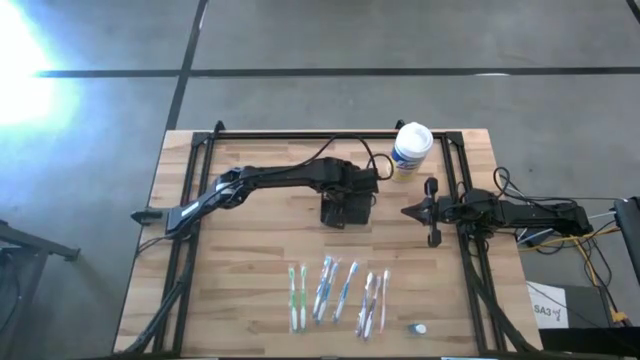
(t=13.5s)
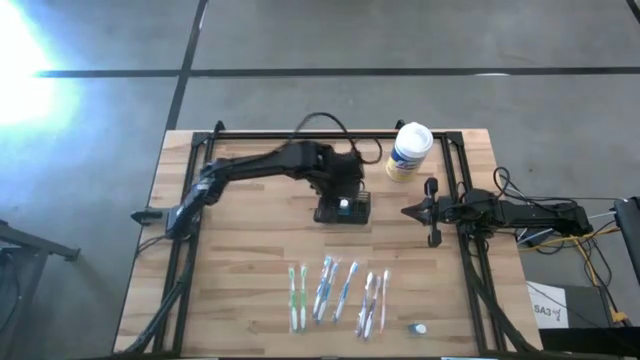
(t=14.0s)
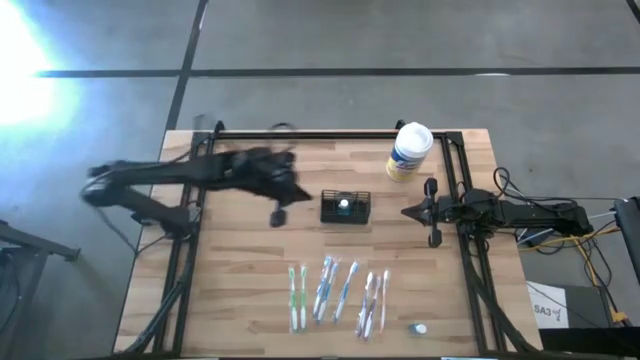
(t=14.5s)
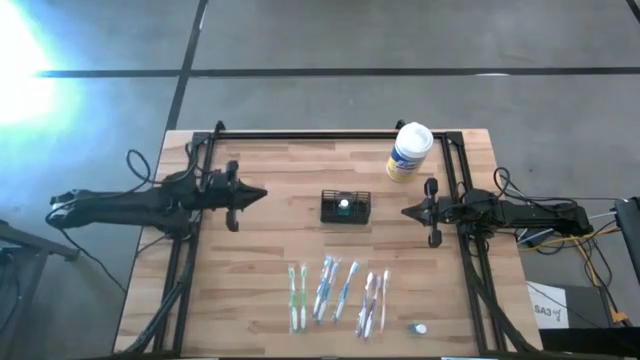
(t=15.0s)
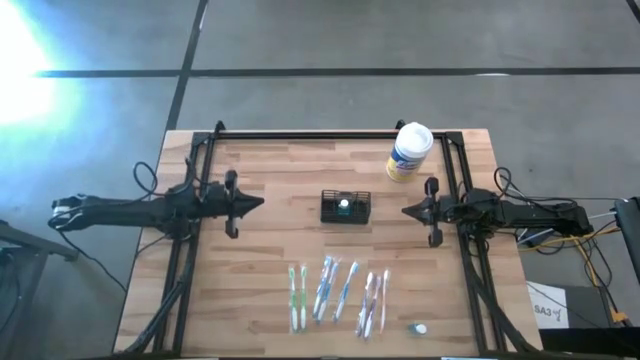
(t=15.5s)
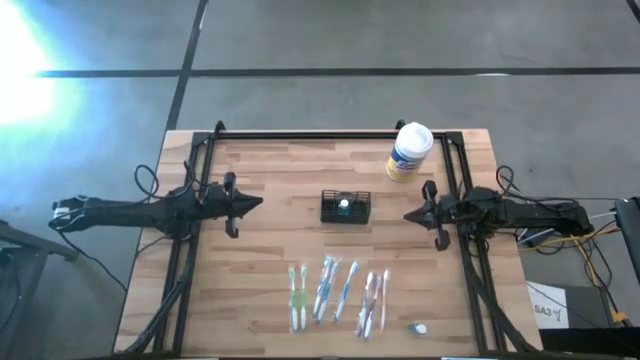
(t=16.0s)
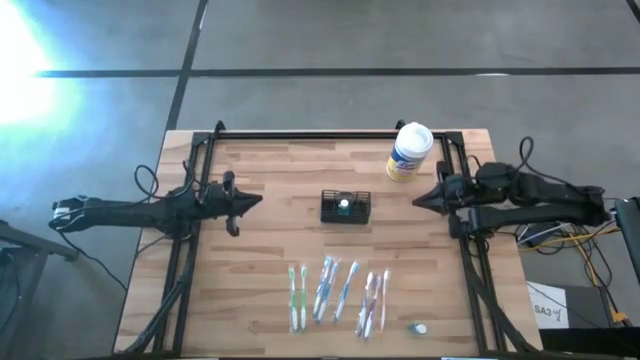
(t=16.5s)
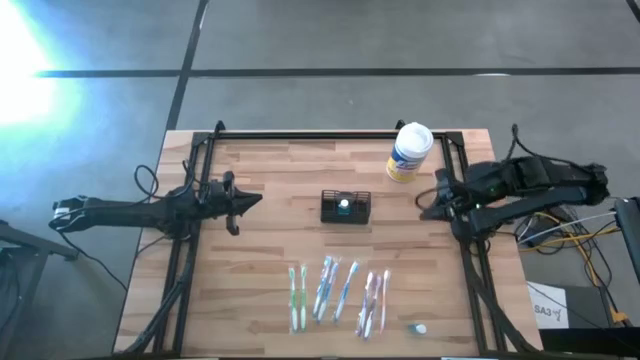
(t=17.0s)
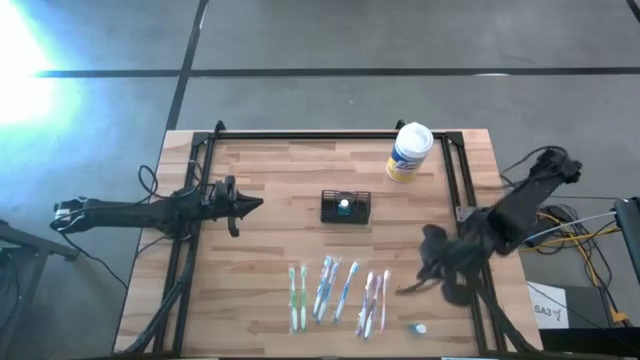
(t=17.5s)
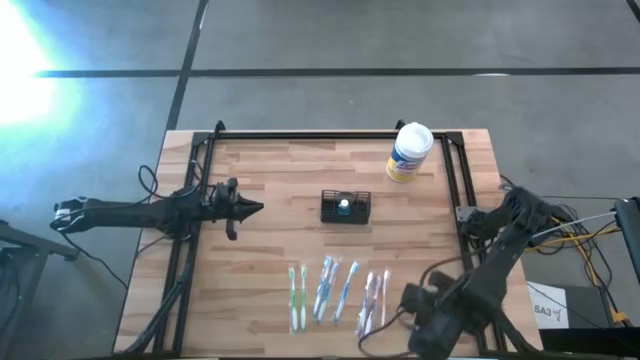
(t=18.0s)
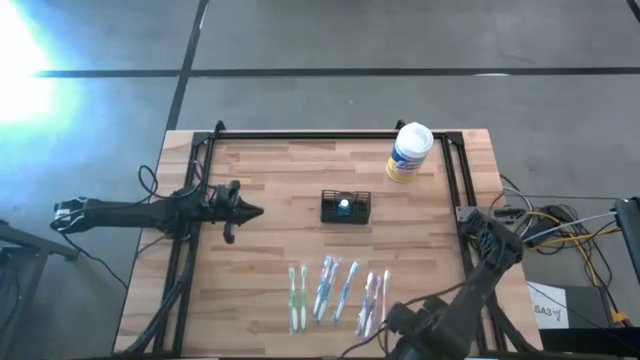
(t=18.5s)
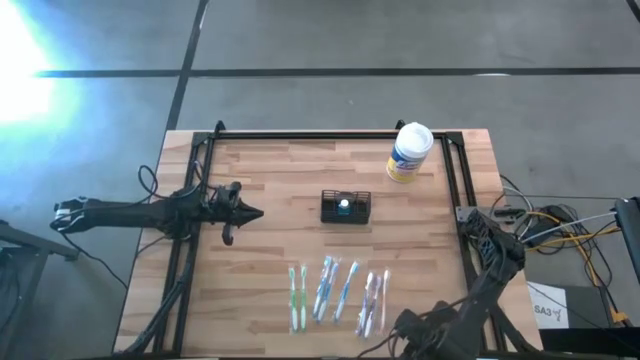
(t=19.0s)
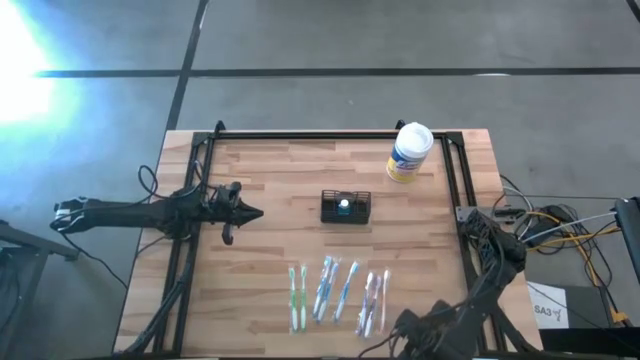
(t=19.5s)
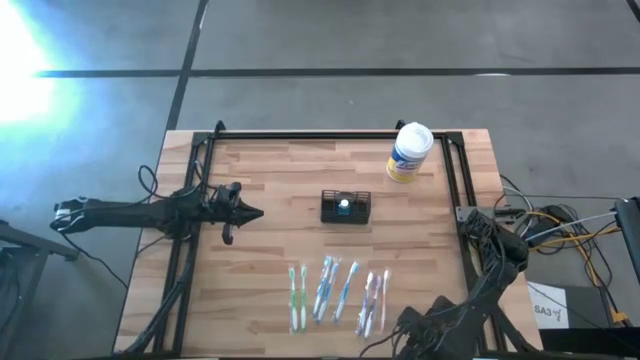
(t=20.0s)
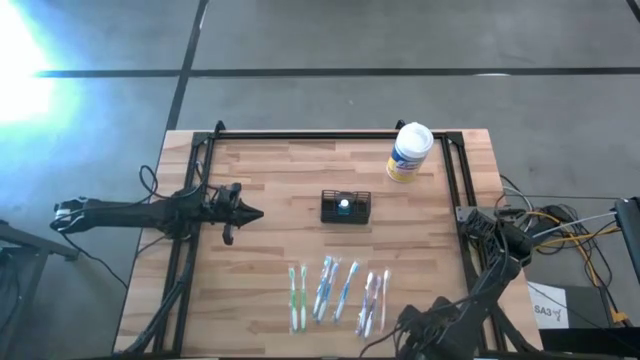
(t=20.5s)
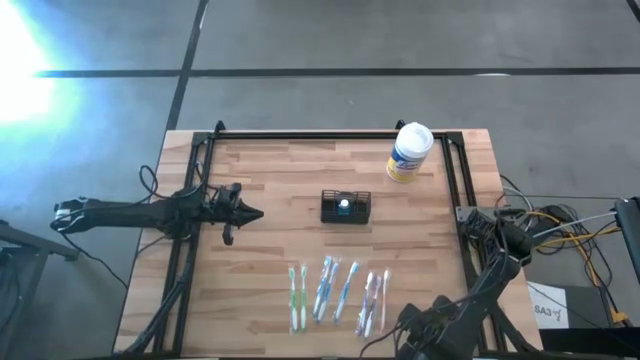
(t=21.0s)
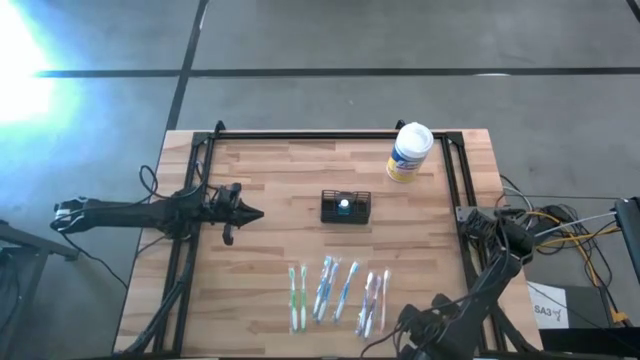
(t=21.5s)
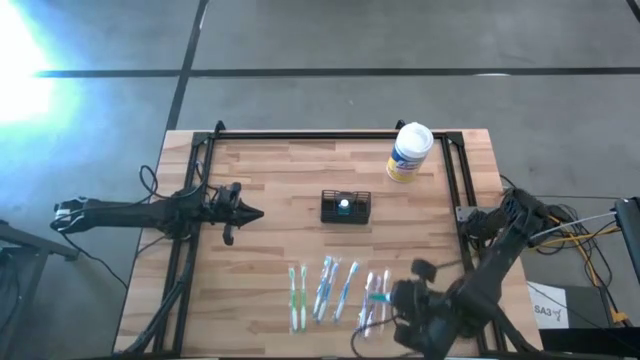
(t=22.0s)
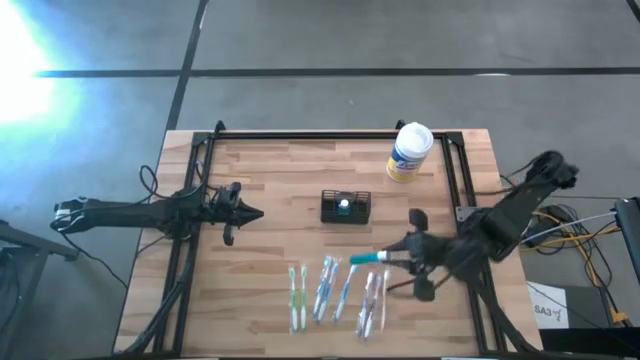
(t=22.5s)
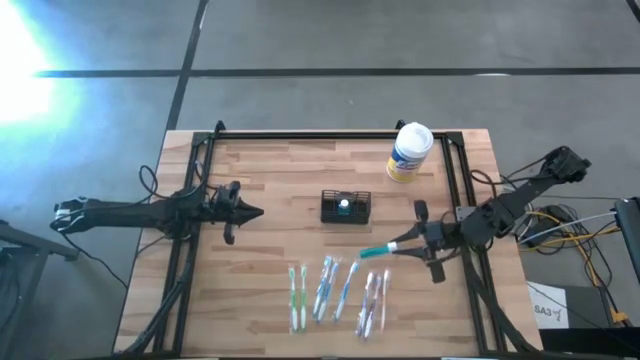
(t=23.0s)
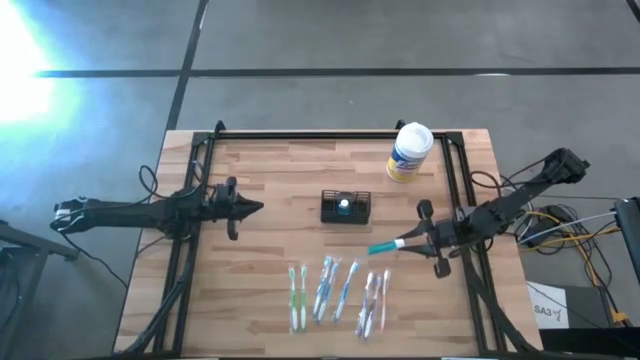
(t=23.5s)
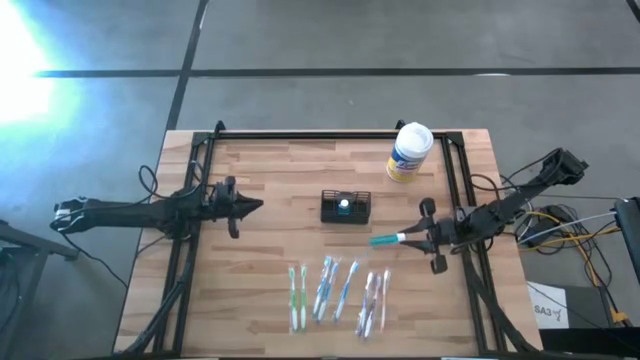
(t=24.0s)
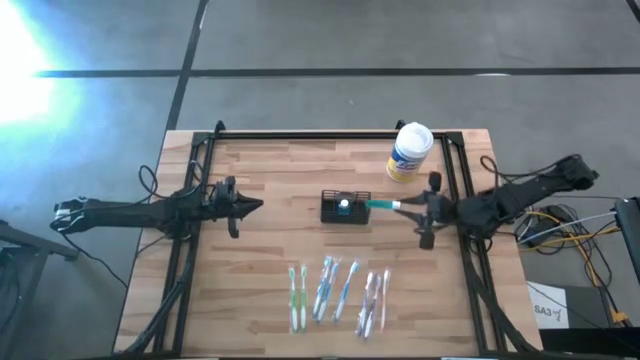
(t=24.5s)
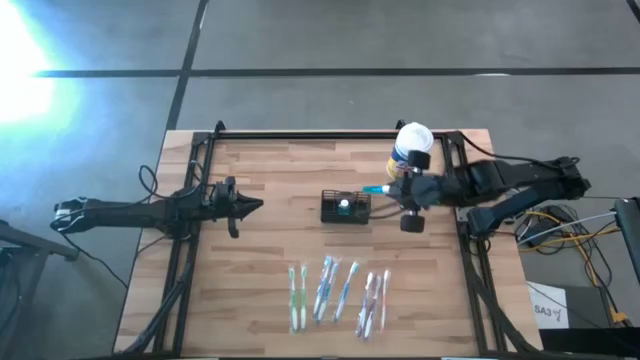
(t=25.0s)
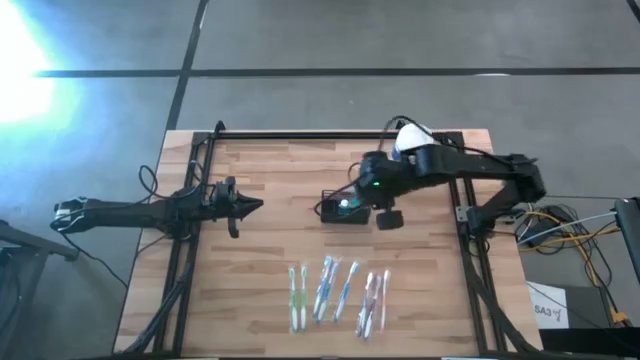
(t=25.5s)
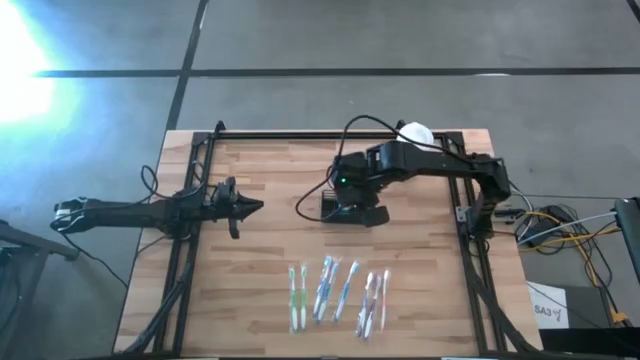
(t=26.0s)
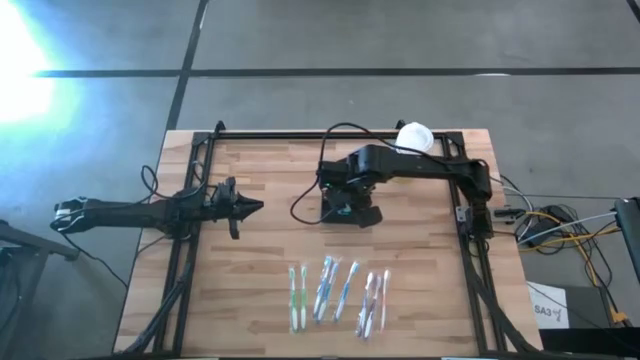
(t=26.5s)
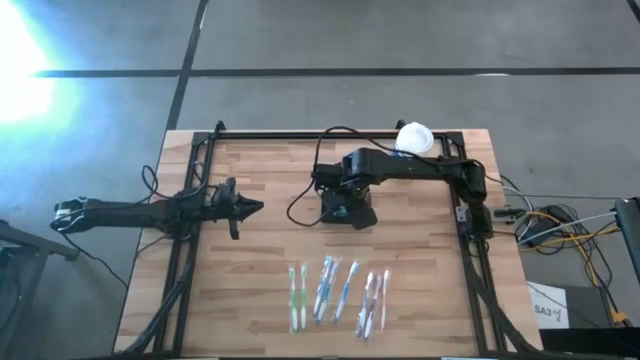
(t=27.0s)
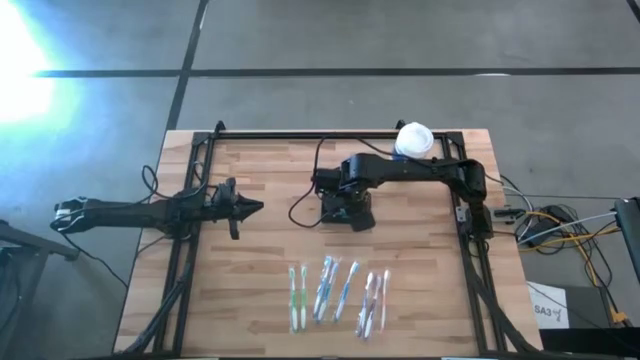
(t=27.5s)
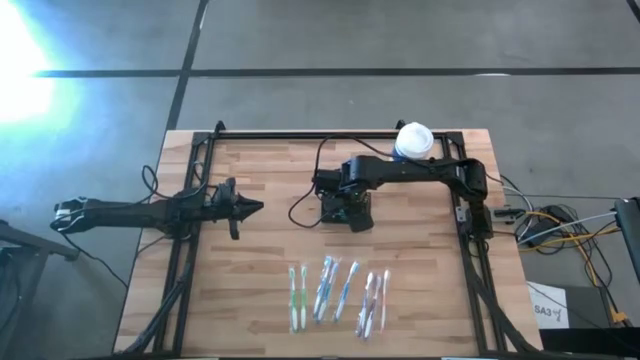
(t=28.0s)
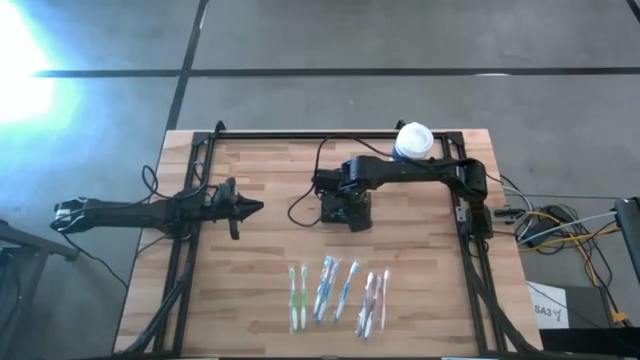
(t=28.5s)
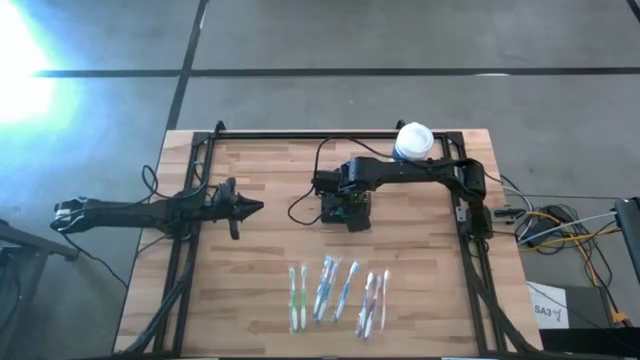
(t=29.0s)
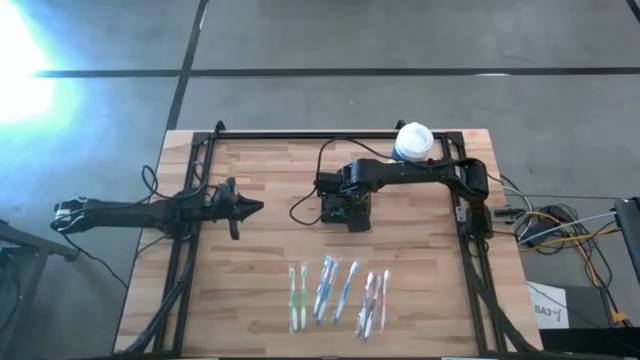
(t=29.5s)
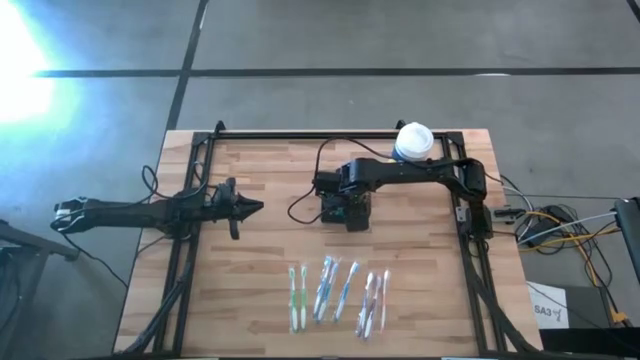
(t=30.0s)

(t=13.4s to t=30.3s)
Task: Pick & Place toothbrushing station
Put the blue mouthwash into the wire organizer
